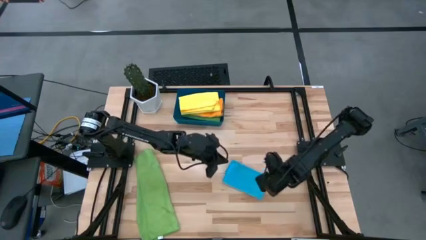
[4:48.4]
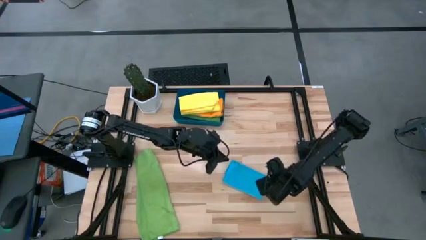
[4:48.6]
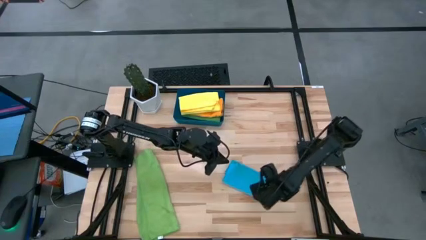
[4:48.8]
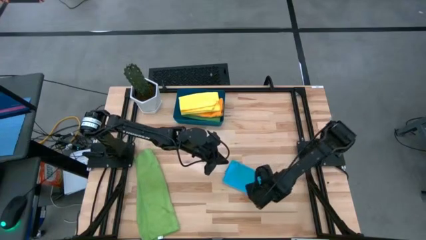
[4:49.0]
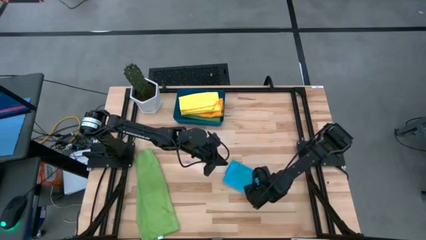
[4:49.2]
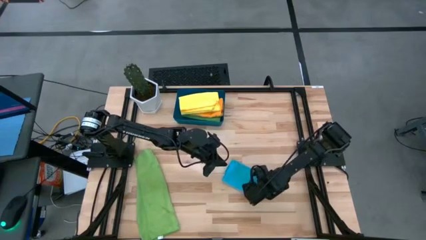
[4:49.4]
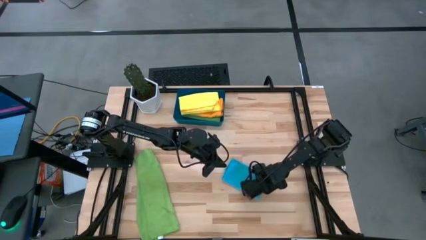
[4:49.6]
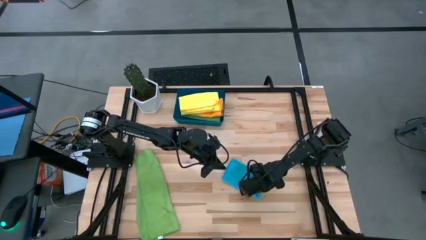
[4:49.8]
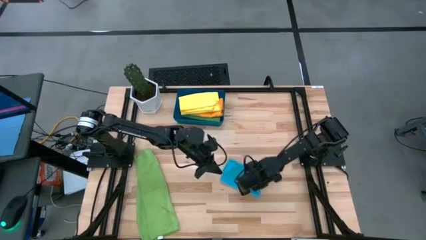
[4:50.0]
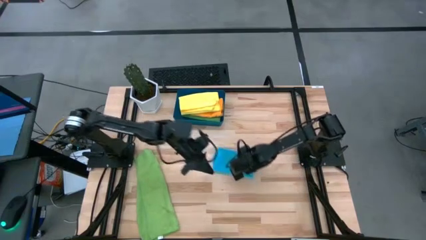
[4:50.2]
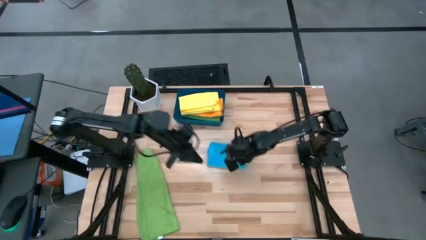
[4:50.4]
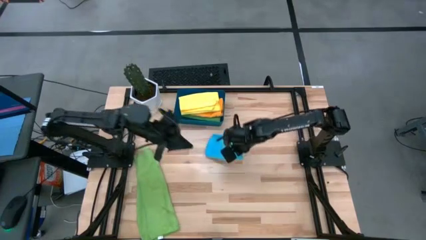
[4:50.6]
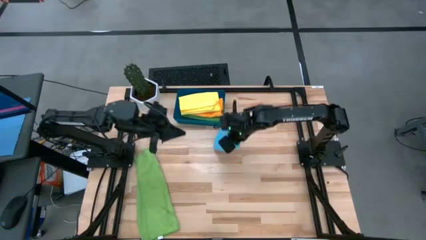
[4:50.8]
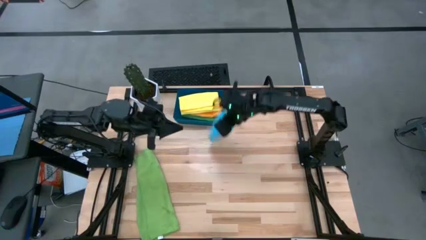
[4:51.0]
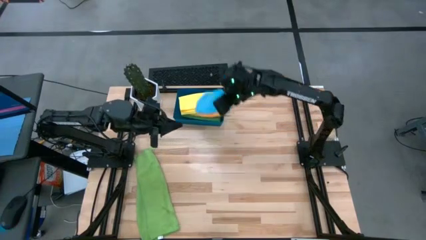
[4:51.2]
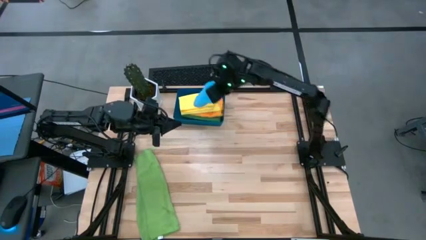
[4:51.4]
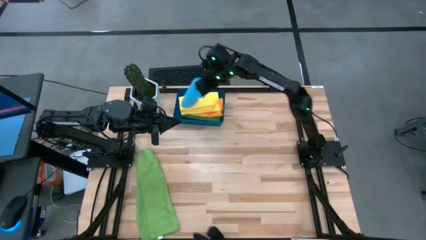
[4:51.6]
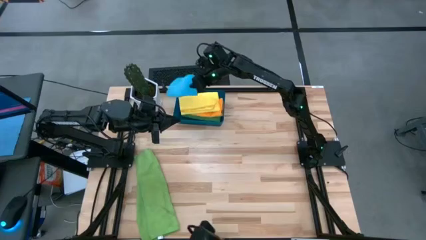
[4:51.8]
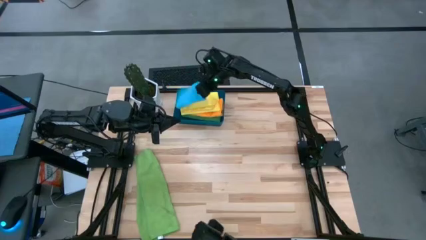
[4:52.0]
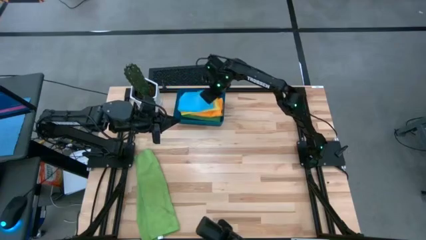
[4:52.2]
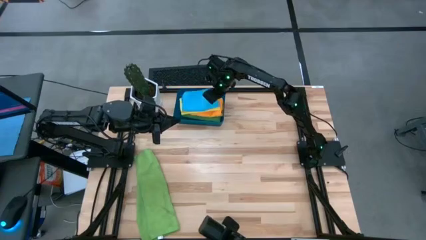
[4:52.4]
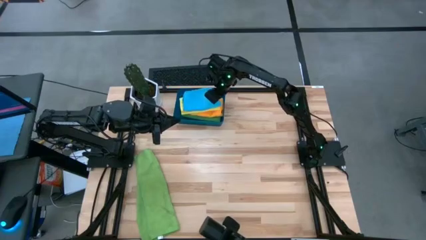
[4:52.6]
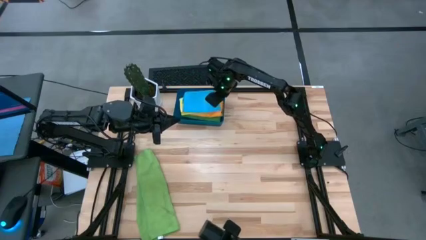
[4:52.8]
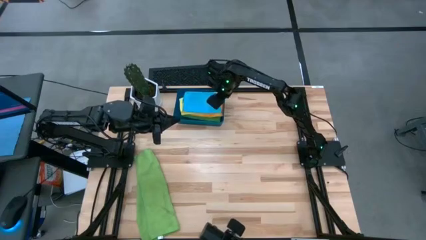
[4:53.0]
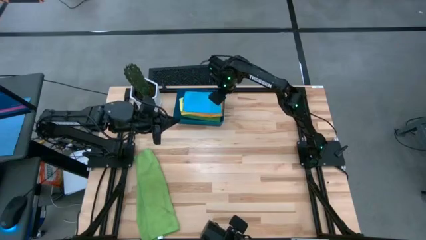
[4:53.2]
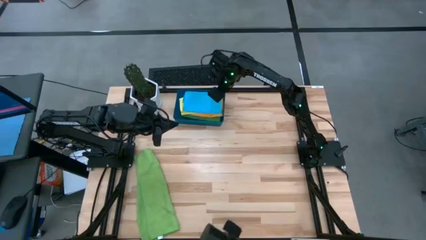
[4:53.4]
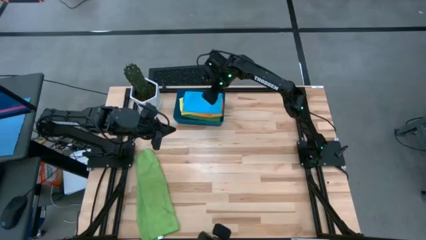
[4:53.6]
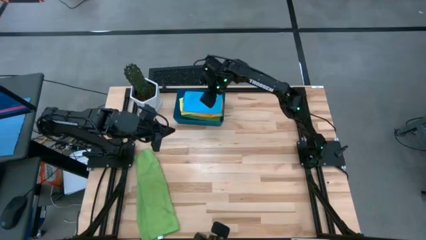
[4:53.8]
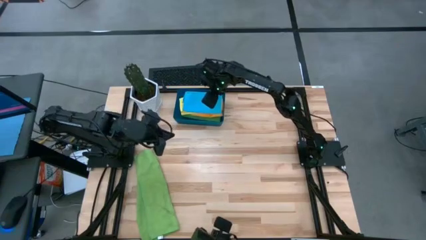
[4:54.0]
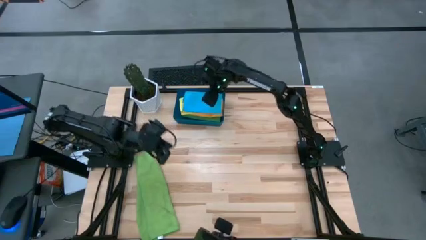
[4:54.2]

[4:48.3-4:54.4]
Task: Fold microfiber towels
Put the blue towel into the blue bin

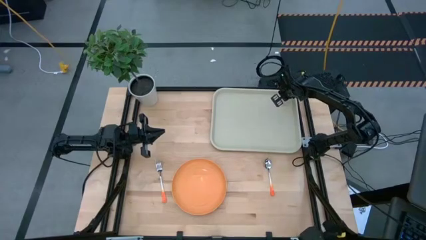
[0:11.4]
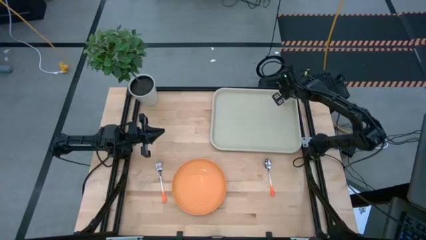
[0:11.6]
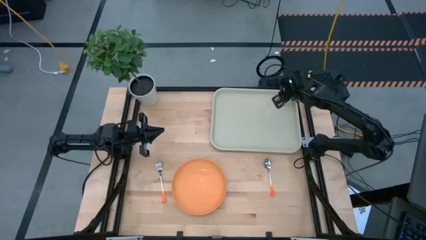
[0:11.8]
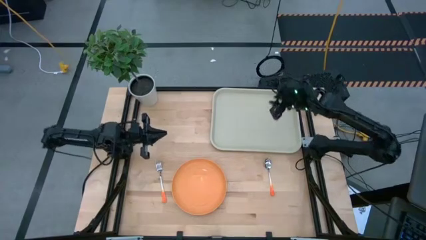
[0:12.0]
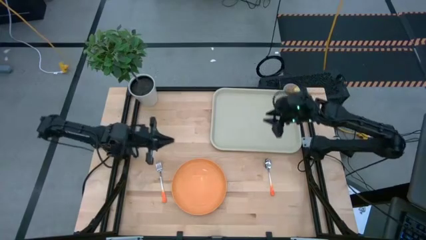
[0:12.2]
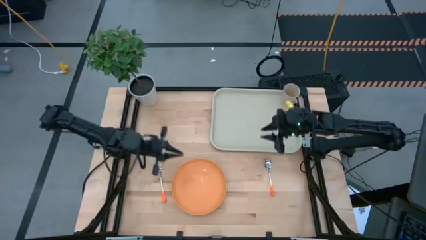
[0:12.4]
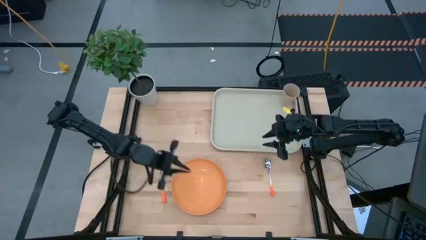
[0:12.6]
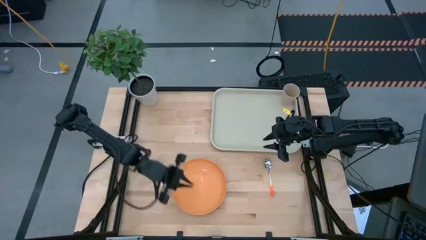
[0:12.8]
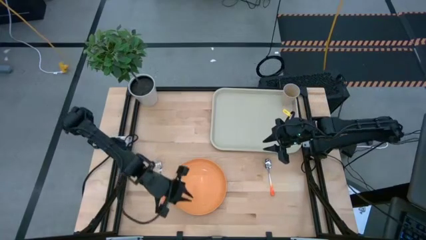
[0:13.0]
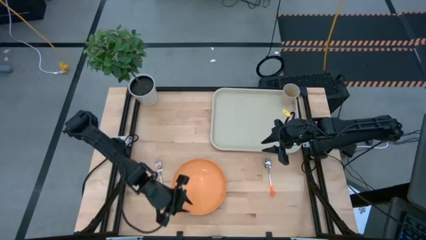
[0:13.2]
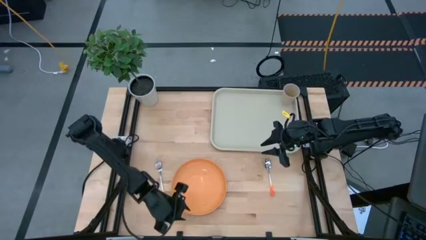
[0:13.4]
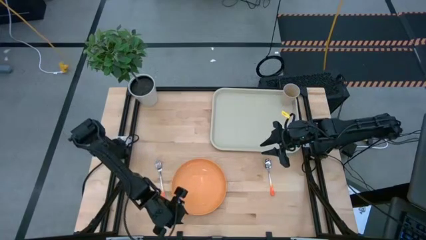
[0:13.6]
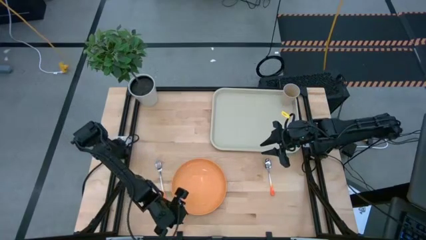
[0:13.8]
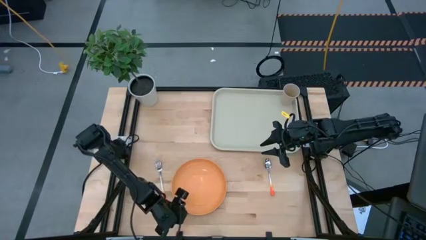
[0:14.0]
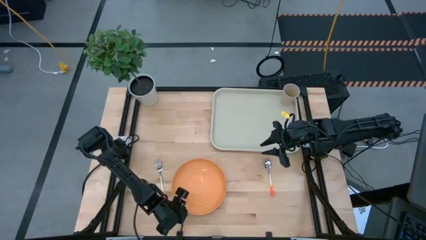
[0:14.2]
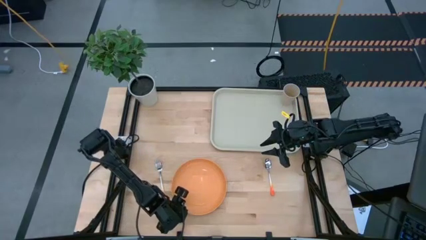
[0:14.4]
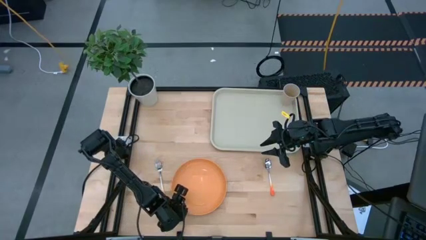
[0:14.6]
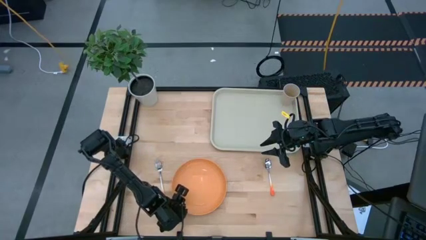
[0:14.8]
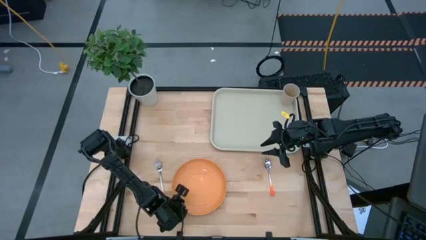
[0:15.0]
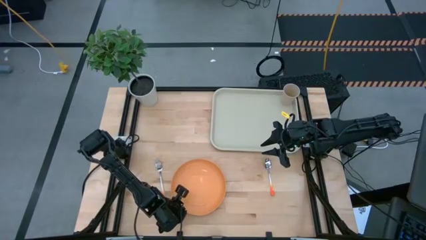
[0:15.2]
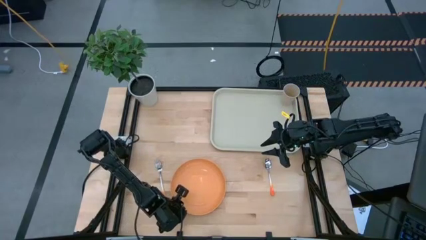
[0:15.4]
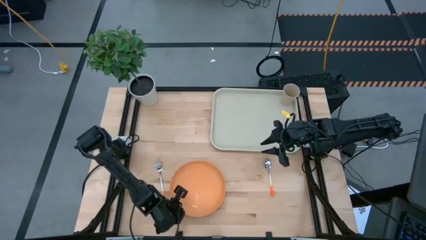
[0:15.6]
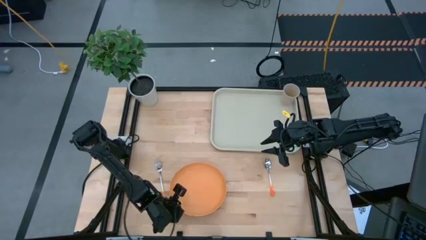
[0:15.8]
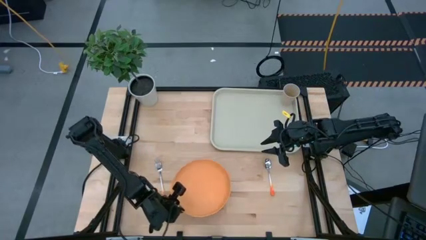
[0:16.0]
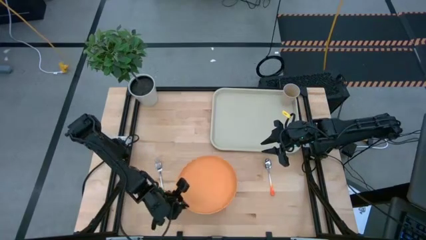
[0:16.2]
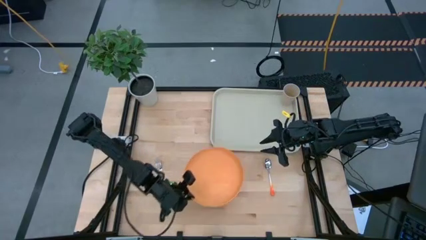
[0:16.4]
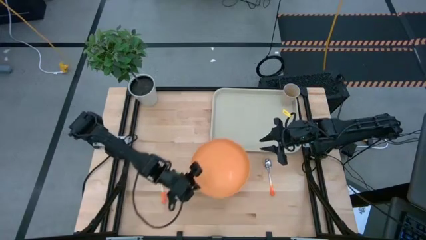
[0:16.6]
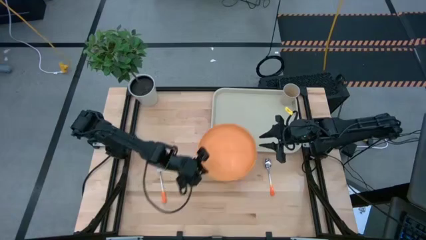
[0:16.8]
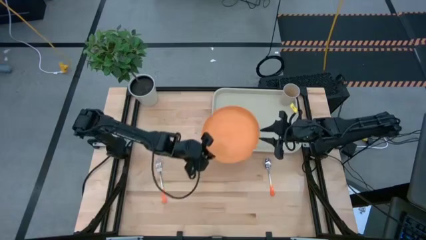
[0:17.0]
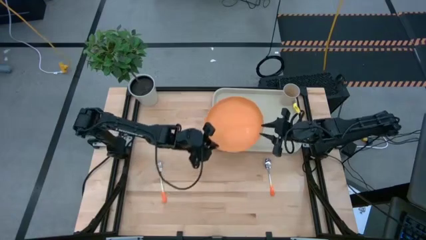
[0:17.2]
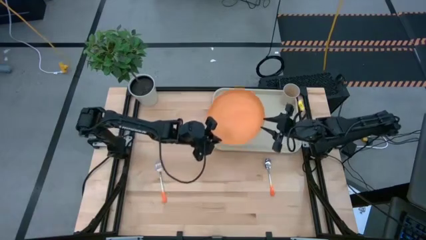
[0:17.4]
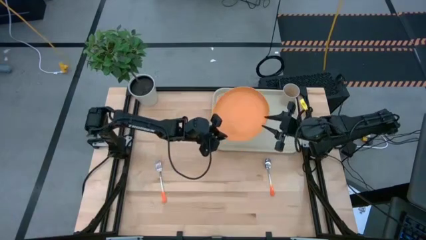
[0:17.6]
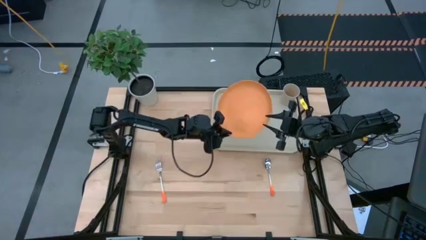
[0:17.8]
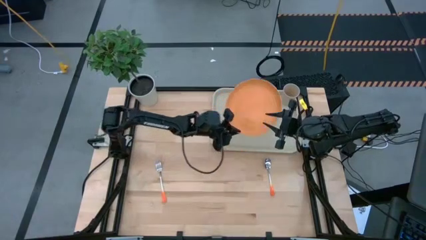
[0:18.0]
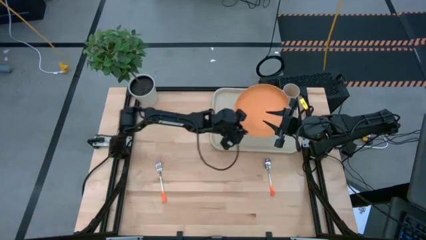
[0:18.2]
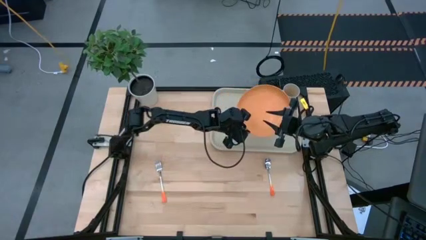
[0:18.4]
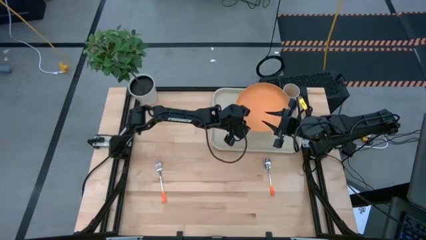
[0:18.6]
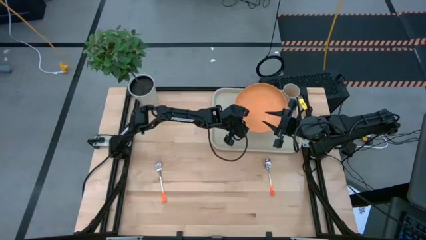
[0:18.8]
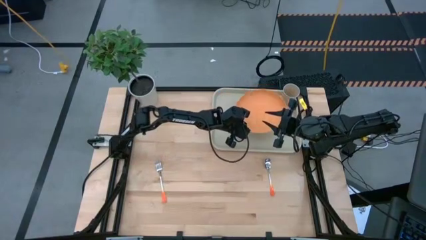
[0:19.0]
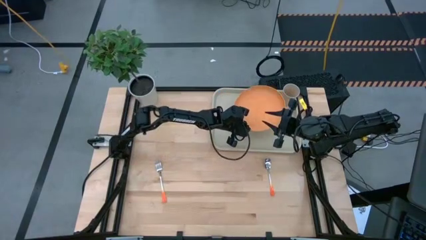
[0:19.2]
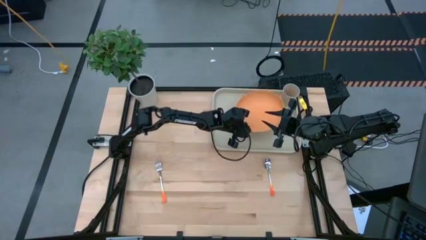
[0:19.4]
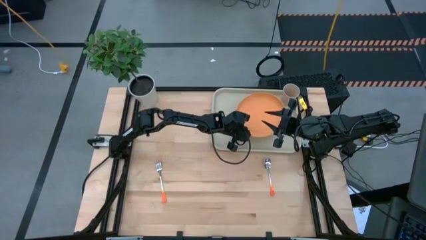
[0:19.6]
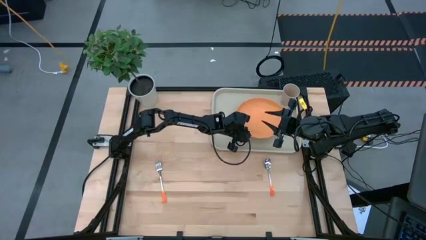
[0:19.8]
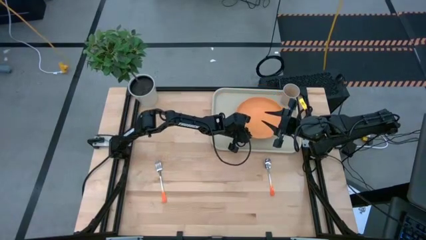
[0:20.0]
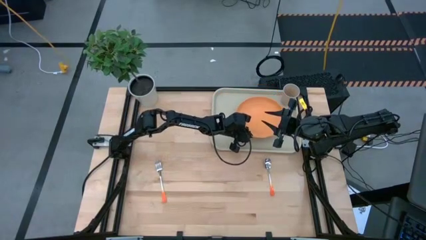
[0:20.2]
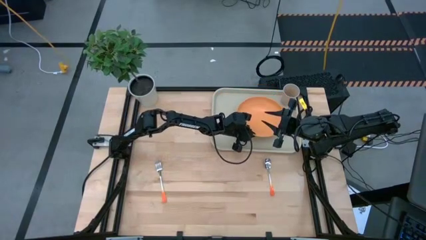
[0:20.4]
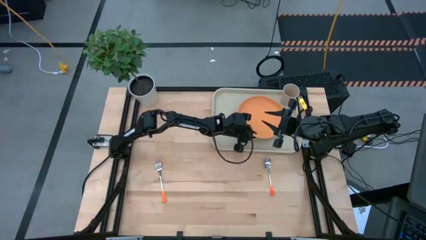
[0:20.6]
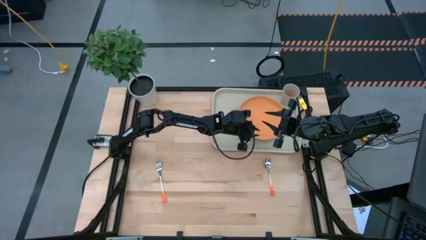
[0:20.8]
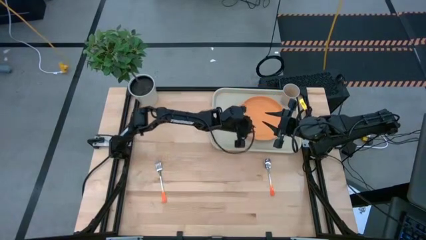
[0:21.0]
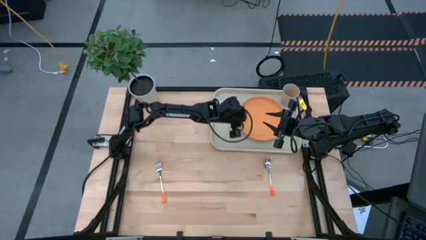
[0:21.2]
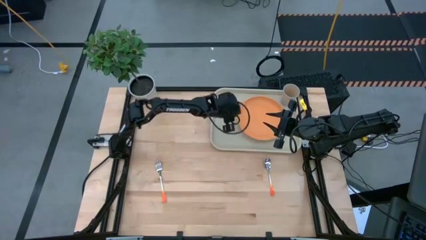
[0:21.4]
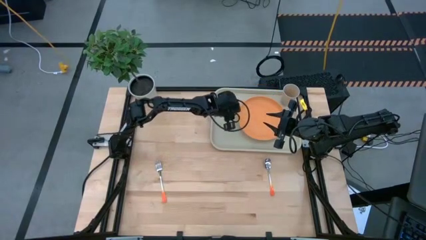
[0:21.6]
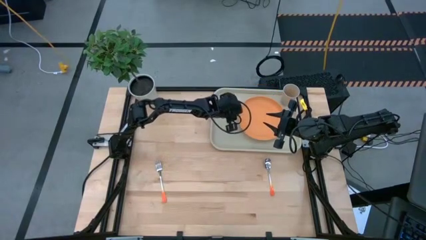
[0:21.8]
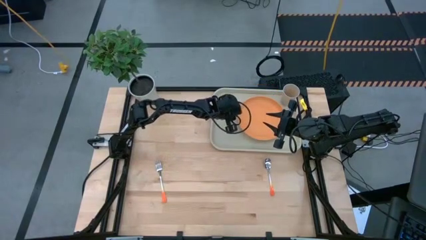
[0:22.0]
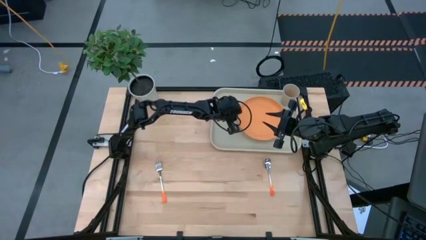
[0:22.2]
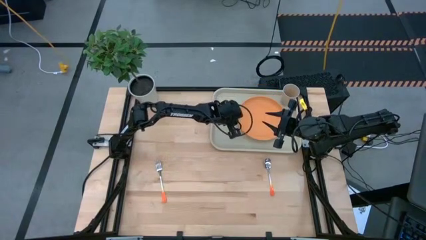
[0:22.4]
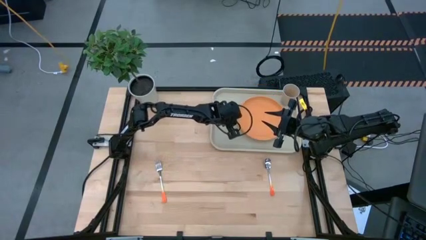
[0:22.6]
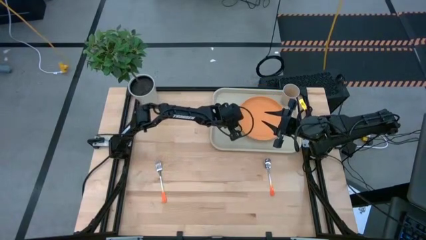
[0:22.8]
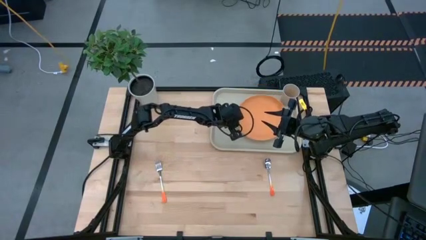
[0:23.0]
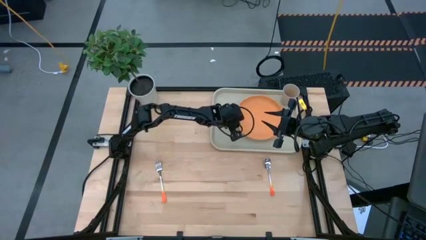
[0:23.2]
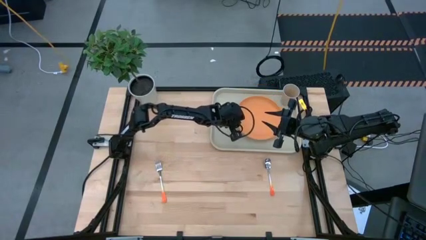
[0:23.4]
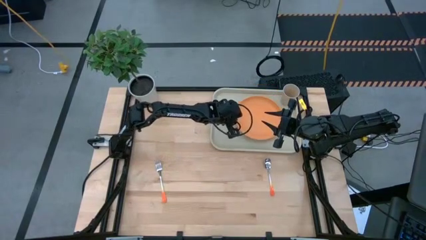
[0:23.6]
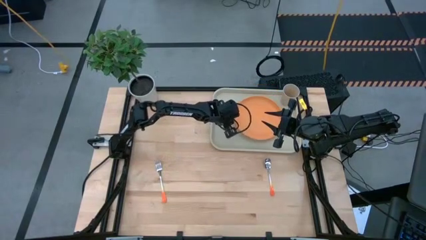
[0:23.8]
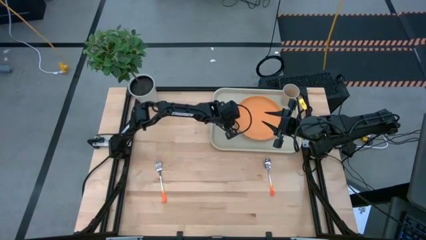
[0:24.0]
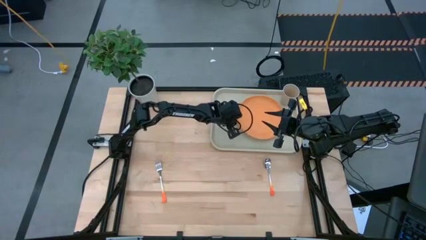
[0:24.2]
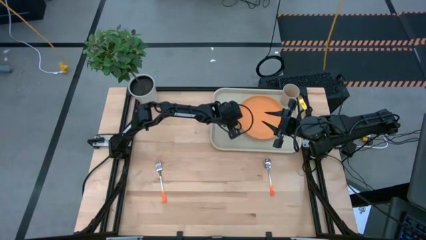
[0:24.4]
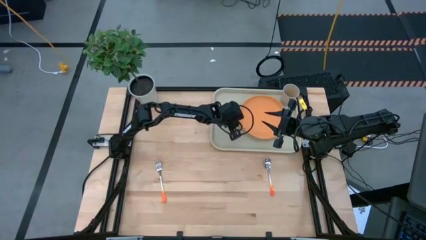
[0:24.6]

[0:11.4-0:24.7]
Task: Pick and place plate/cup/fork/spoon on tray
Put the orange plate on the gray tray
